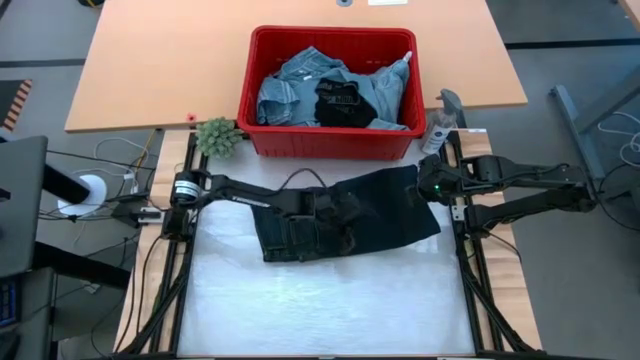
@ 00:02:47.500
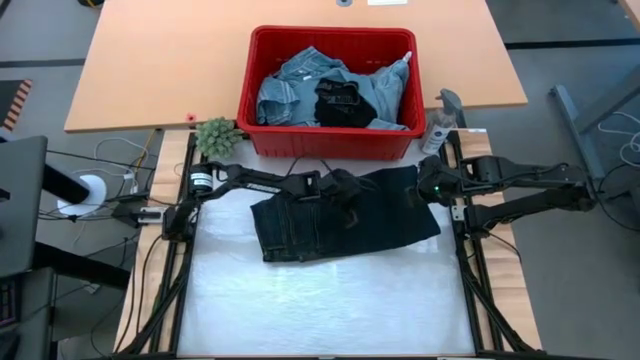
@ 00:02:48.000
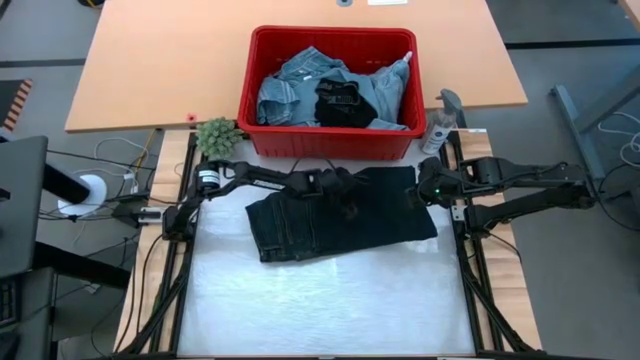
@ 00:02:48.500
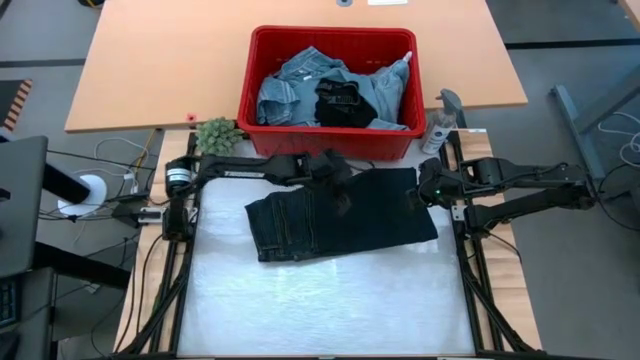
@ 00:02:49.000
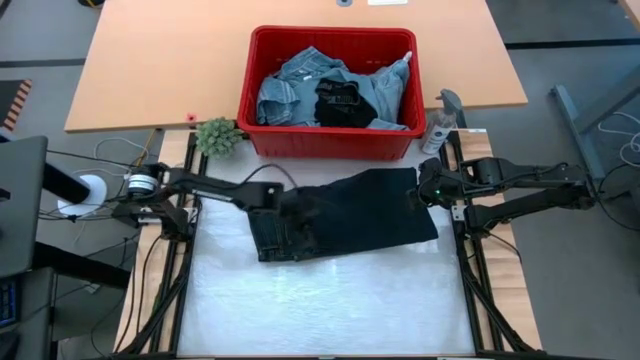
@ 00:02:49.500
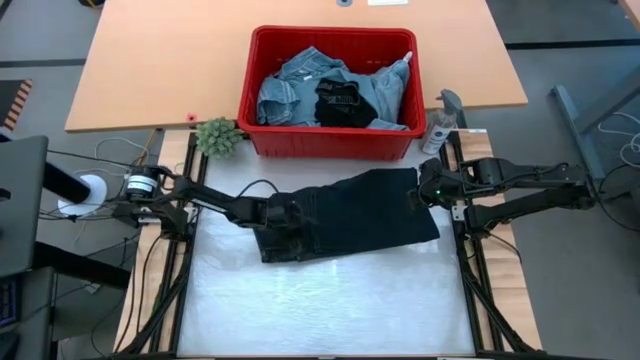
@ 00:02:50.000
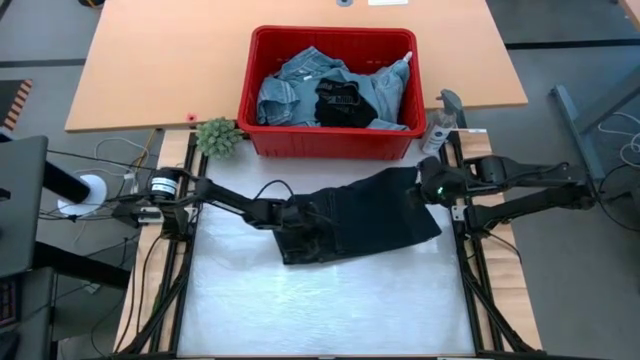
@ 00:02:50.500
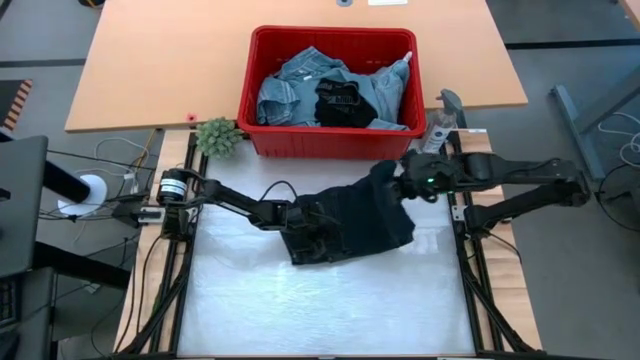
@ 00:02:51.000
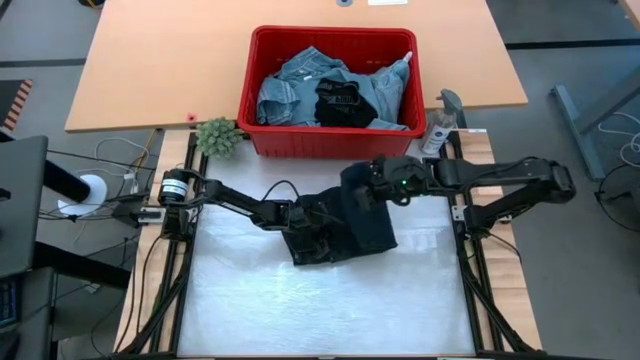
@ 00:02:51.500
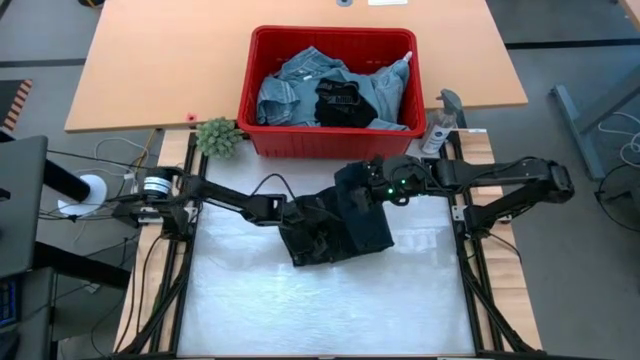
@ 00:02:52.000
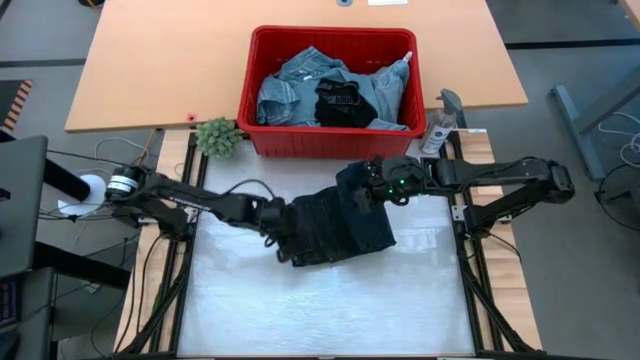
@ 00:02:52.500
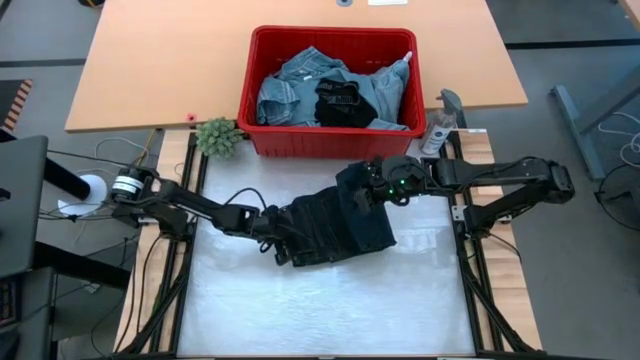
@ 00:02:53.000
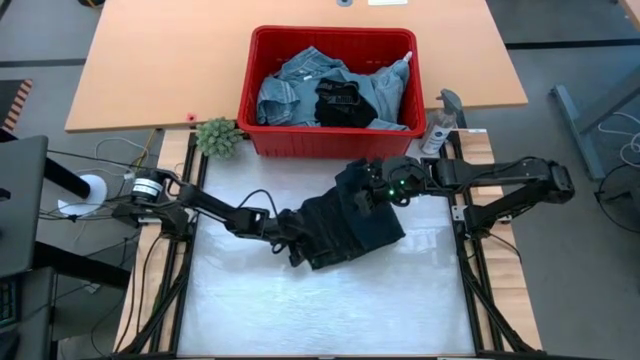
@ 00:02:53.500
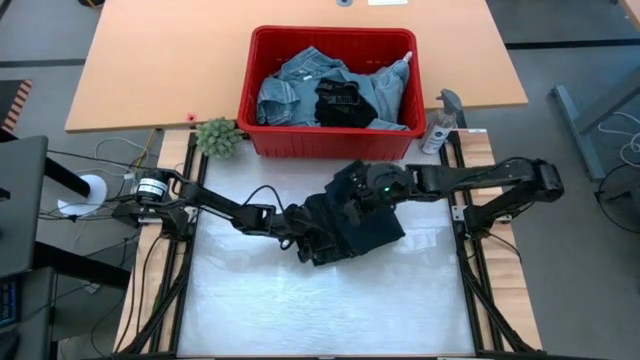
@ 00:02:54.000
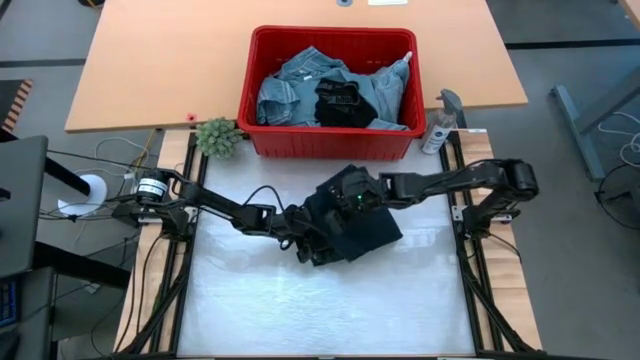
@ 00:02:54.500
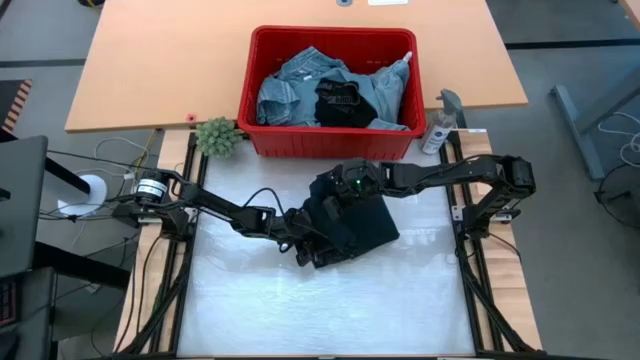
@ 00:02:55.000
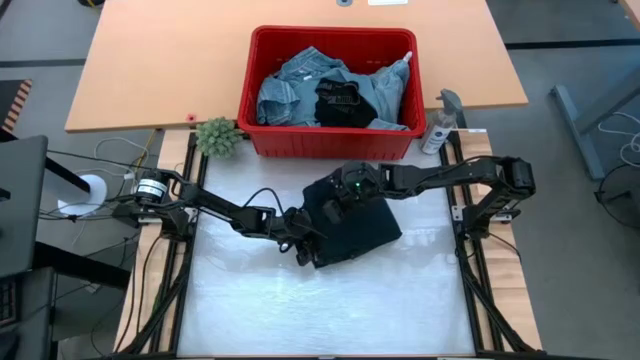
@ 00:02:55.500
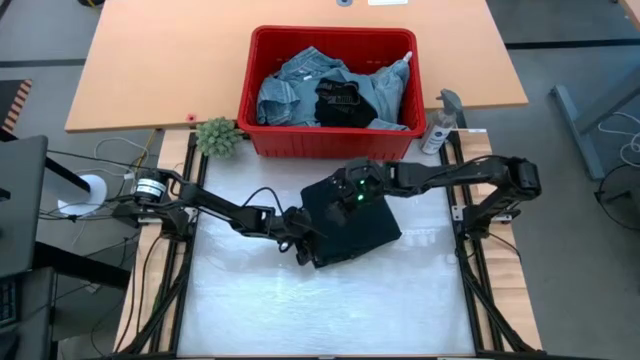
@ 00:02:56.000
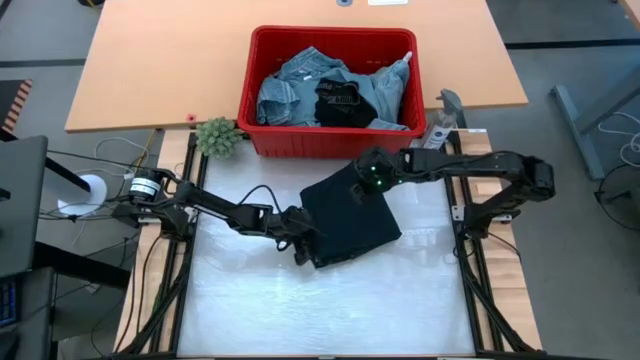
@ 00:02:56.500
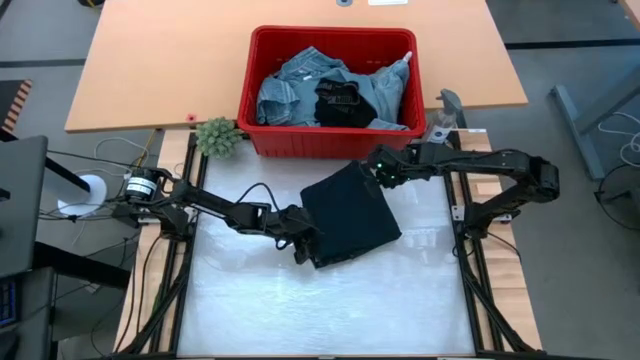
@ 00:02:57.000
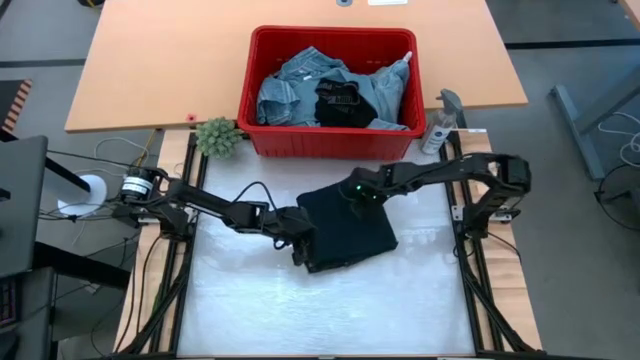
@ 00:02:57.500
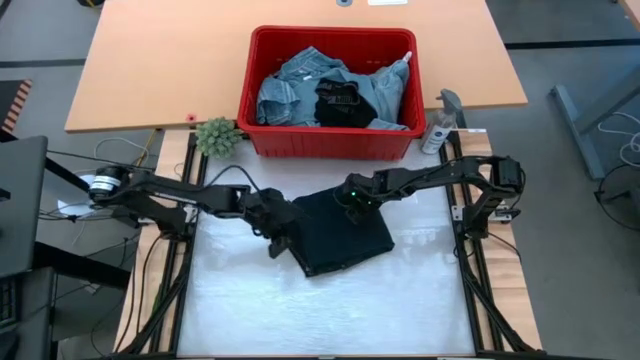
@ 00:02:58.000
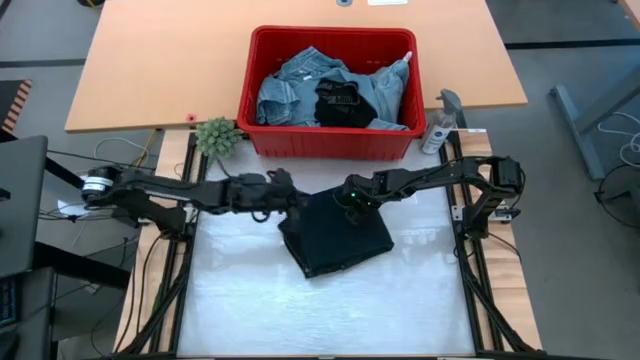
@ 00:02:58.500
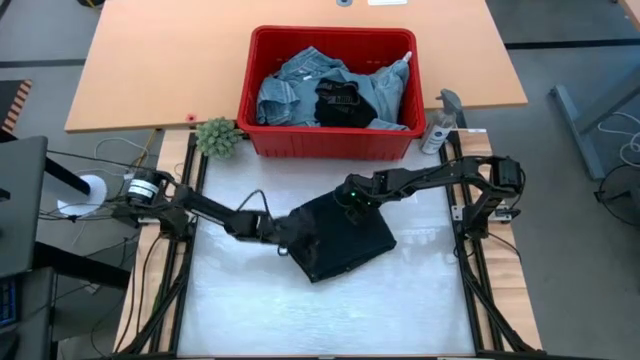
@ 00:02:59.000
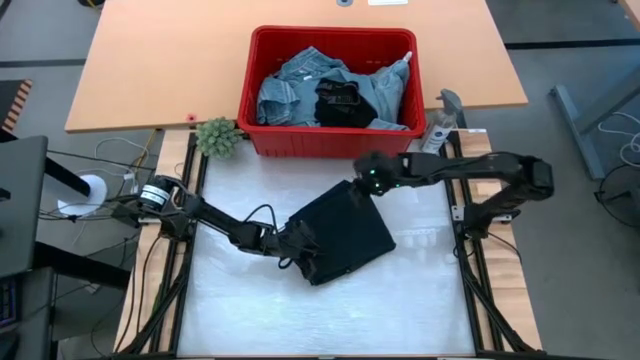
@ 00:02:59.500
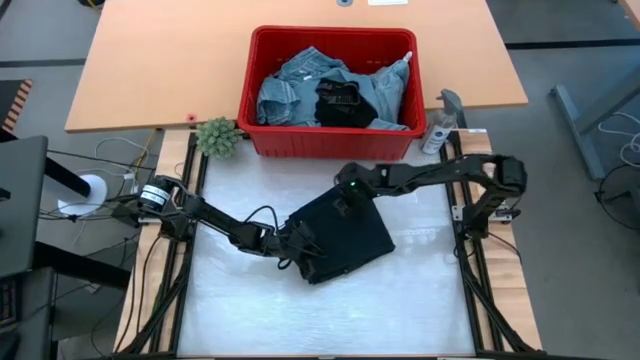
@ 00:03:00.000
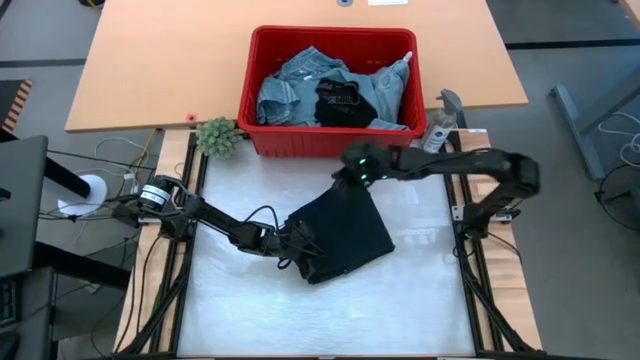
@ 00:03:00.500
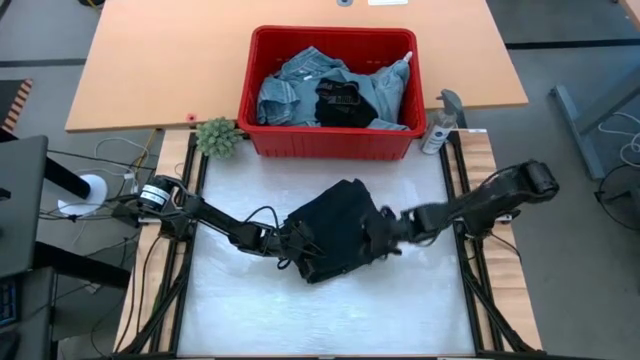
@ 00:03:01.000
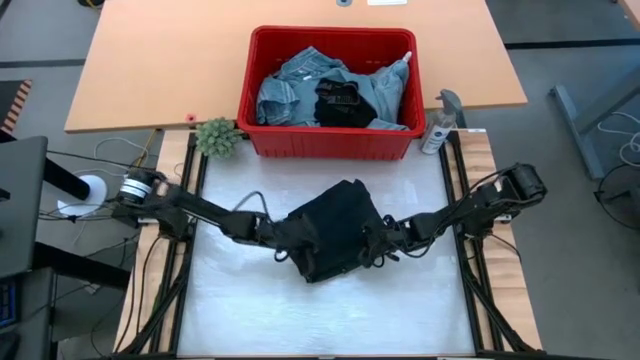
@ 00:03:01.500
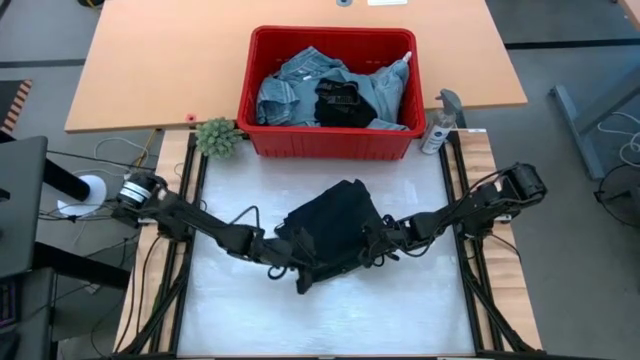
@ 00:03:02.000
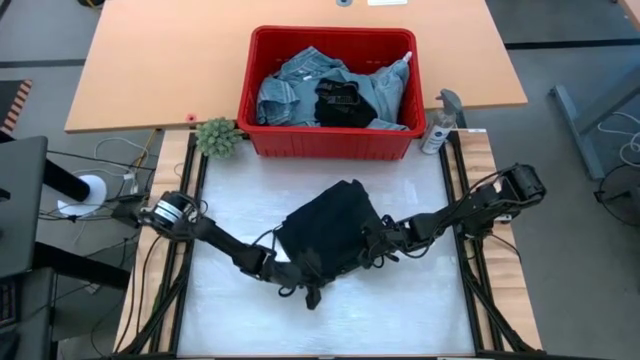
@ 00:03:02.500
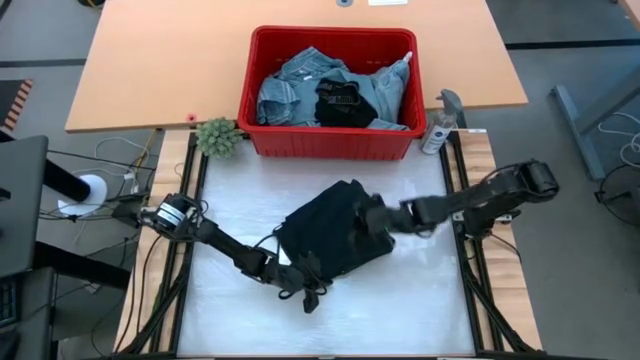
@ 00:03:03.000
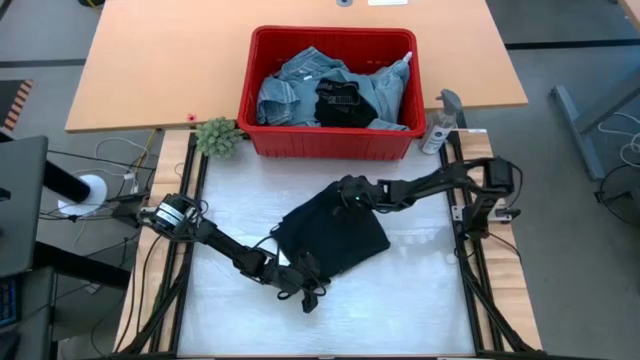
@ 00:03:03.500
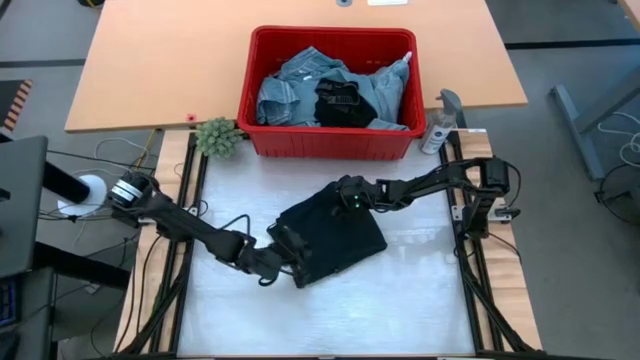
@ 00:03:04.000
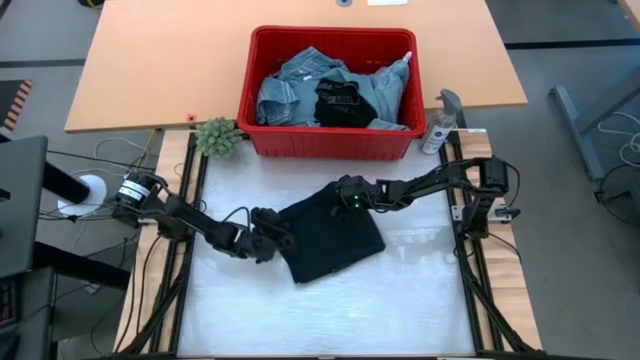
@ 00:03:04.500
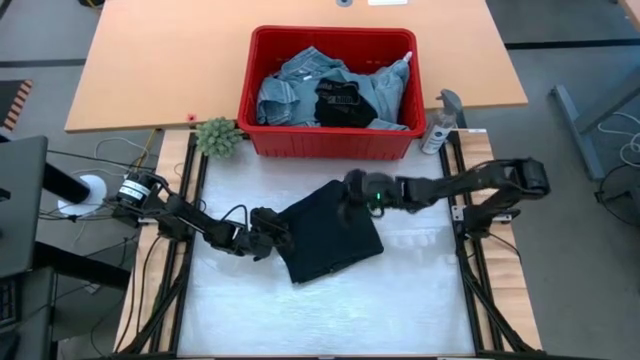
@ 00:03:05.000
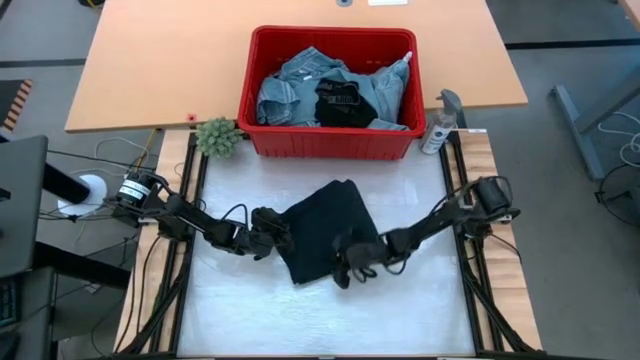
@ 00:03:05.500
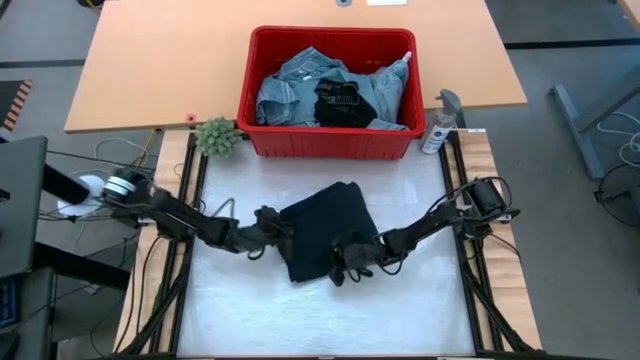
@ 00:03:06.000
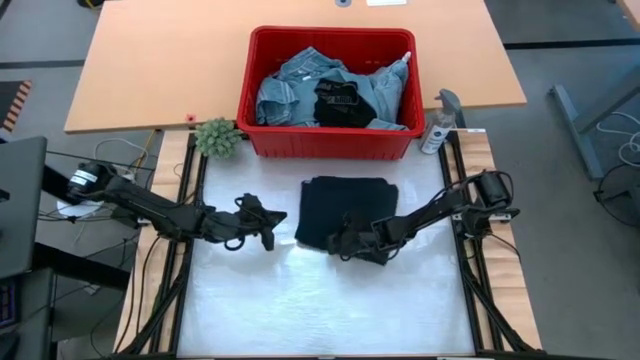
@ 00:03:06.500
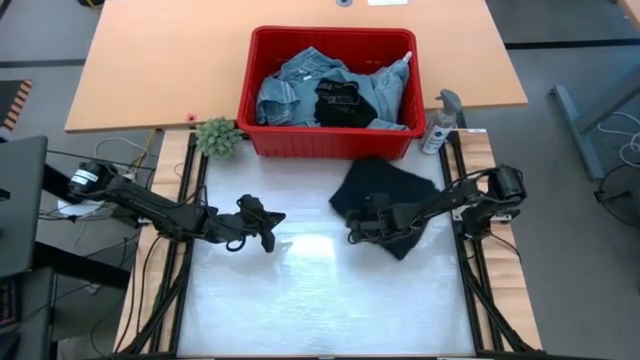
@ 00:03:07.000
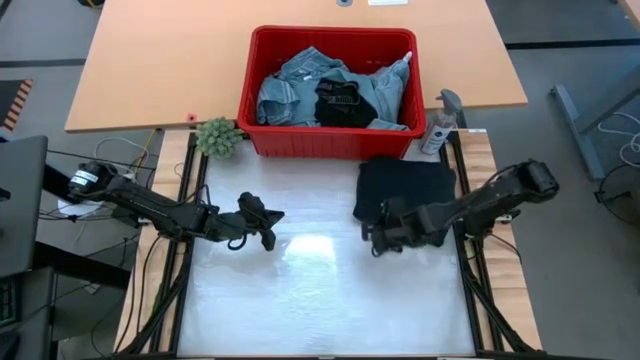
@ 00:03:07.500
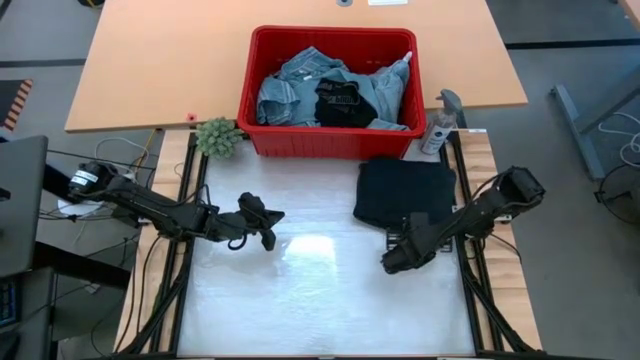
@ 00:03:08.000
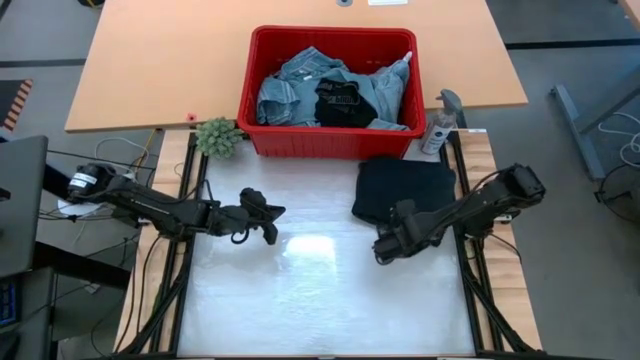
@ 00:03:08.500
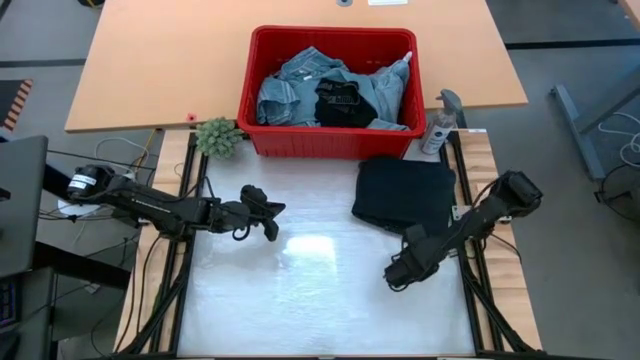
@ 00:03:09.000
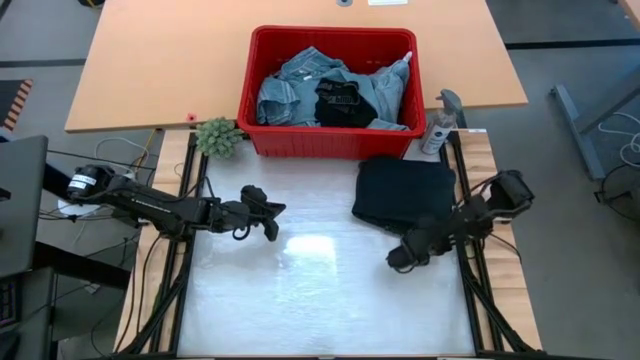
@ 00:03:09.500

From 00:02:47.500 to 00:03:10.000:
Task: Fold Laundry from Bin
Fold the black pants
